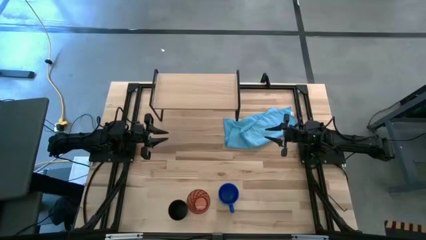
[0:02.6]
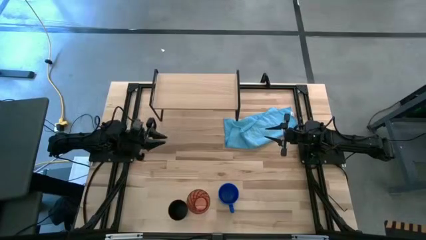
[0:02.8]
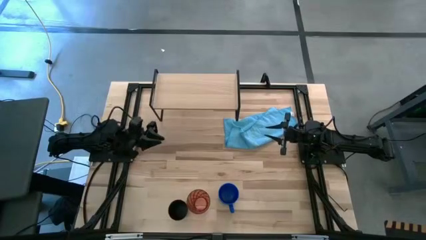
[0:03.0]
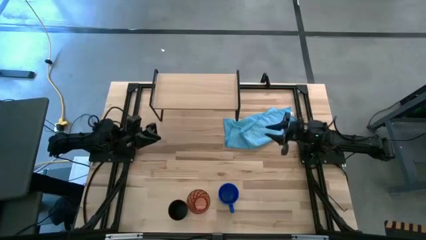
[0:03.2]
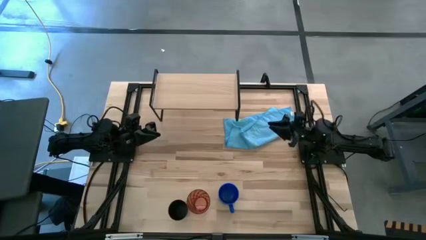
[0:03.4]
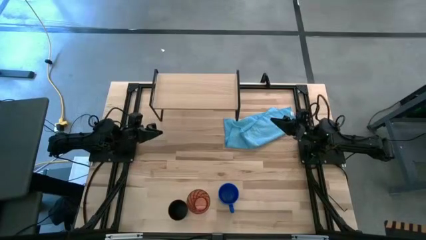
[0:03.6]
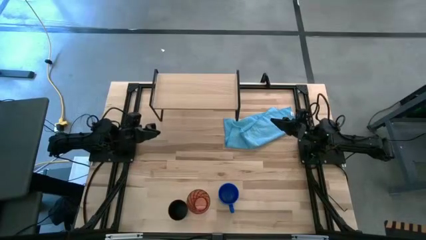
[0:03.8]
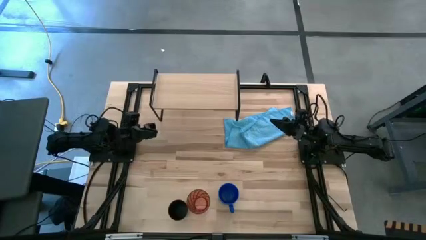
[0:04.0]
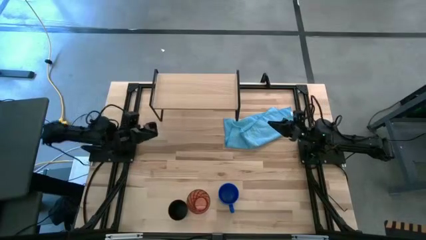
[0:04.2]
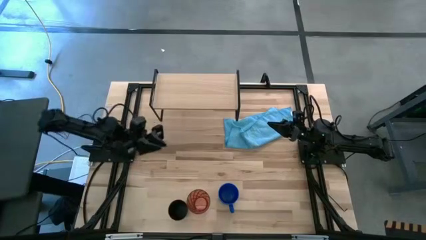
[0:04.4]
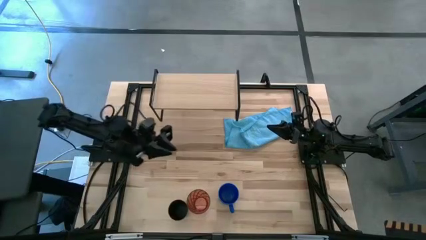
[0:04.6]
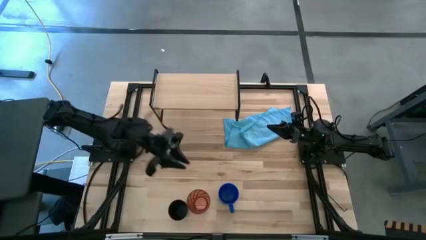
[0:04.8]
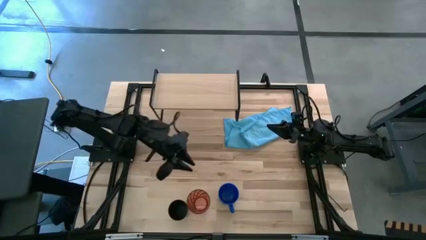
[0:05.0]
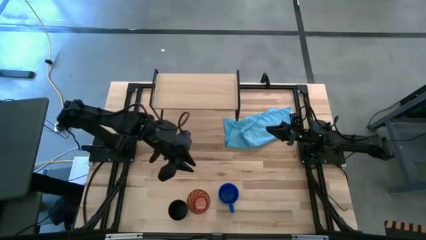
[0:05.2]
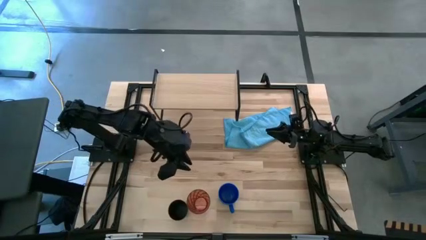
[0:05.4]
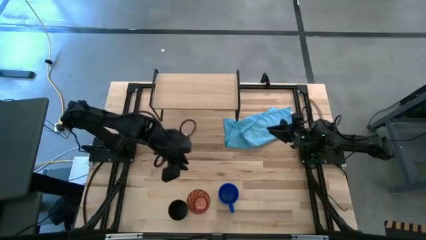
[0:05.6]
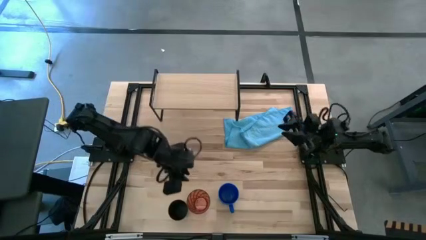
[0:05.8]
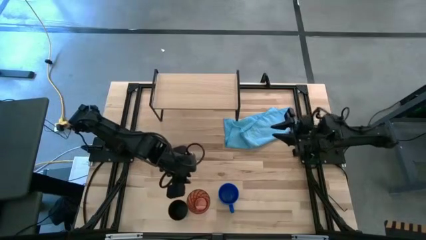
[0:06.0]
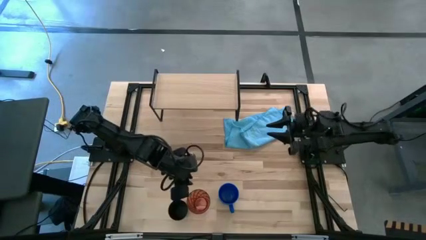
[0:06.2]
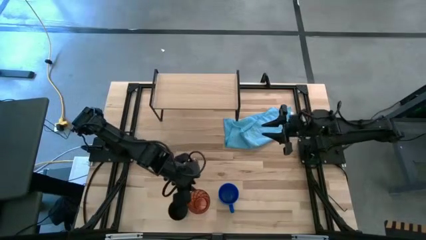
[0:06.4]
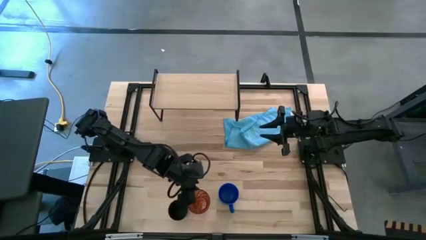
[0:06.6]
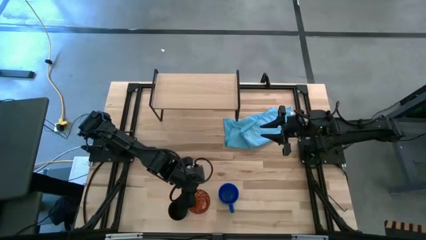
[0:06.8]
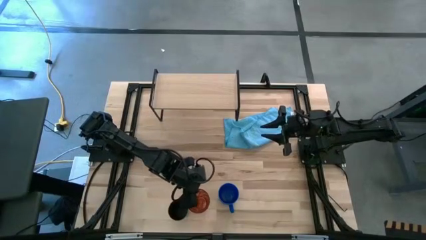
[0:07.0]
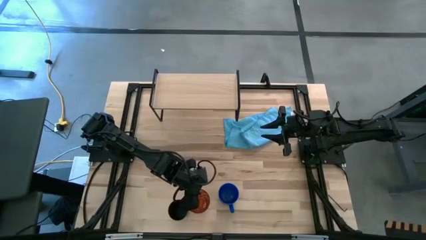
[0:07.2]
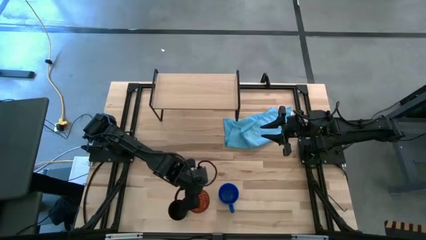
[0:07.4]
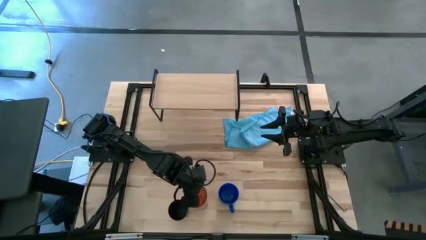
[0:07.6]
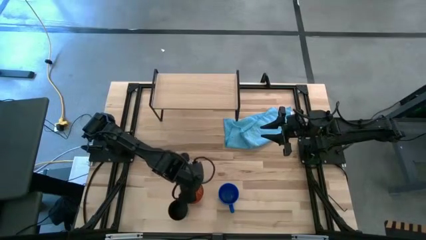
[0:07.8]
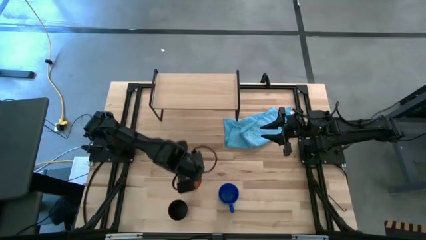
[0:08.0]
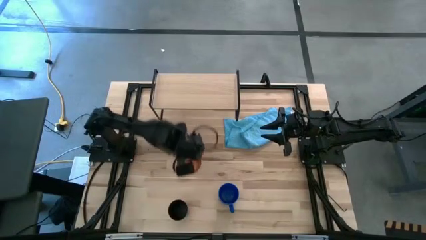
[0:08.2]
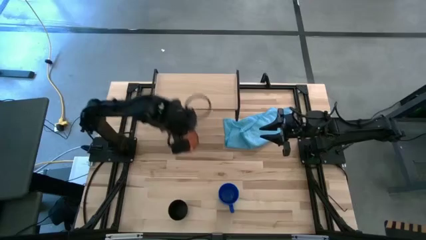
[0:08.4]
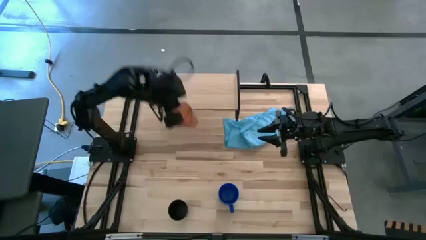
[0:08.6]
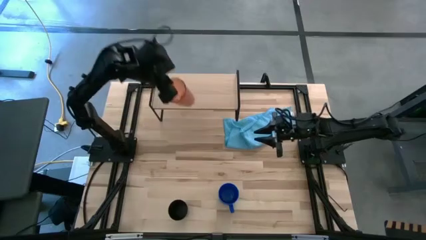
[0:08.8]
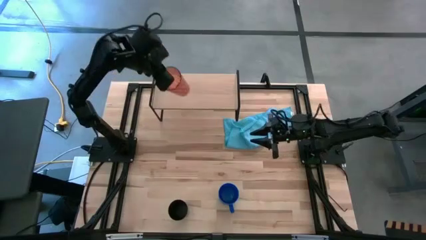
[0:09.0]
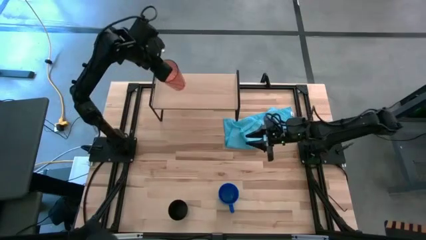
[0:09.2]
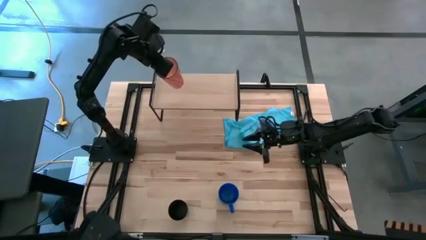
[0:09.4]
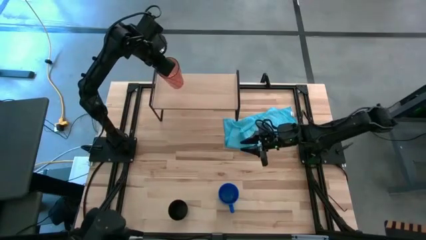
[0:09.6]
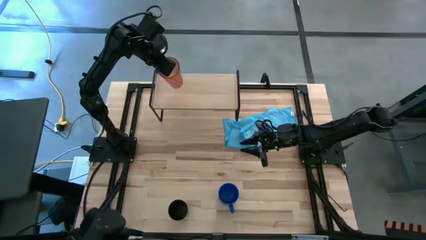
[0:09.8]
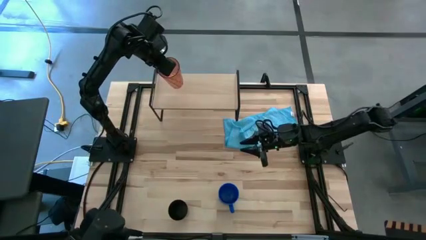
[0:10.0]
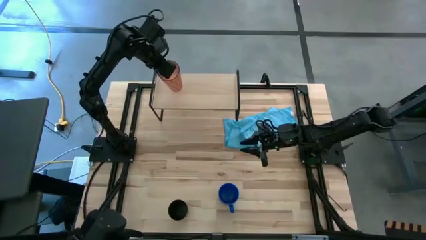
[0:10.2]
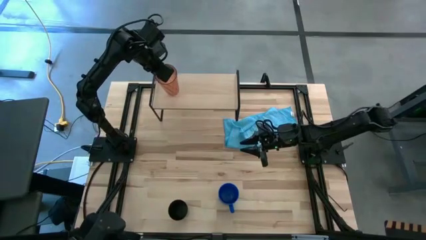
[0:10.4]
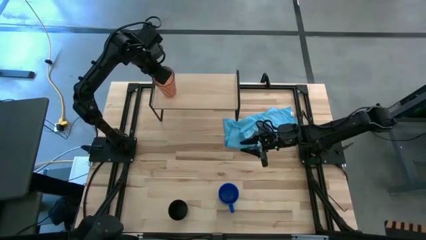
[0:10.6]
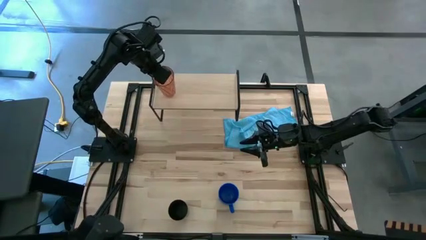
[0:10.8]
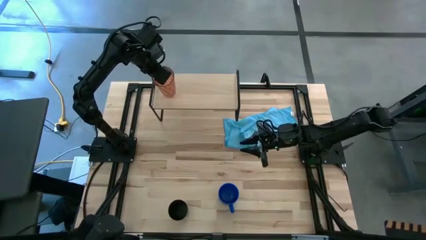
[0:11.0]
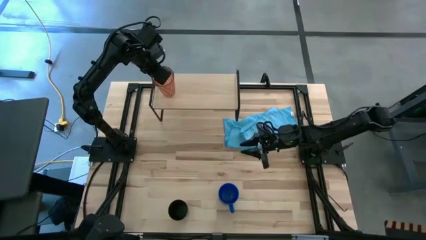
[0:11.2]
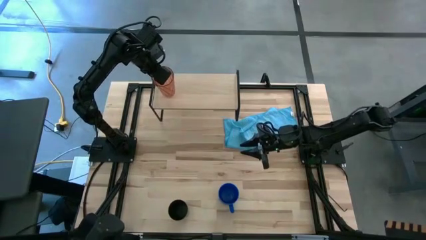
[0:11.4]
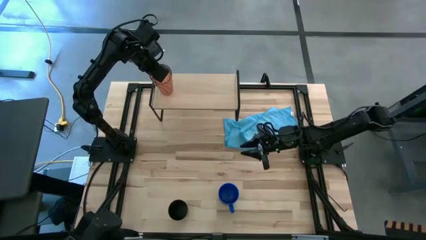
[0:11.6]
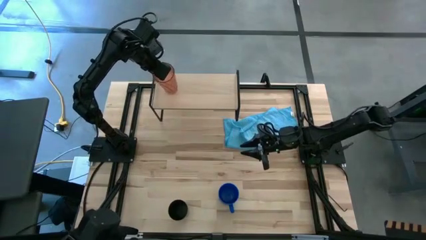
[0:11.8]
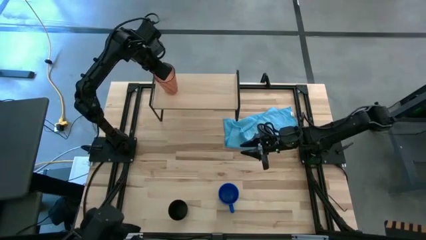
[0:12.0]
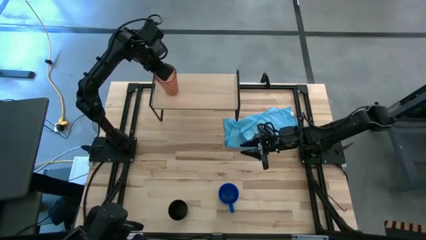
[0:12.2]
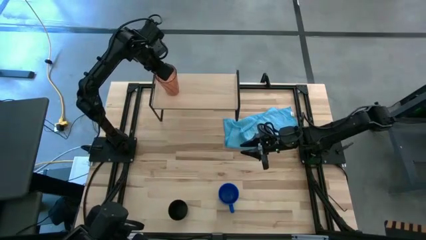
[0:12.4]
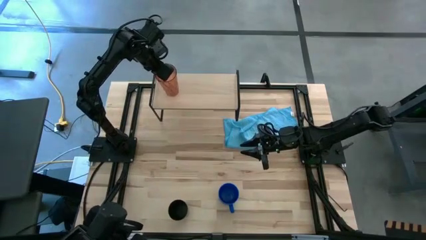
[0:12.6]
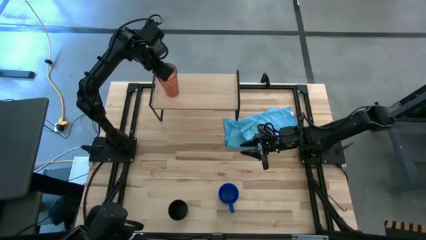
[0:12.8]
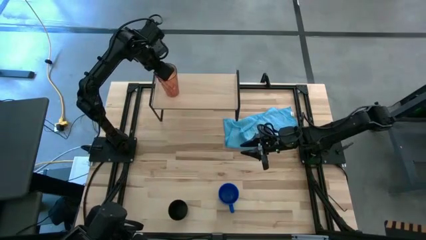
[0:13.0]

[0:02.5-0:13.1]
Task: Stack small to large cups/mugs on shelf
Put the orange cup on the shelf
